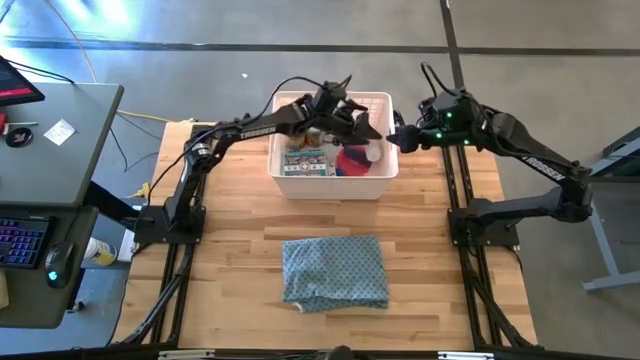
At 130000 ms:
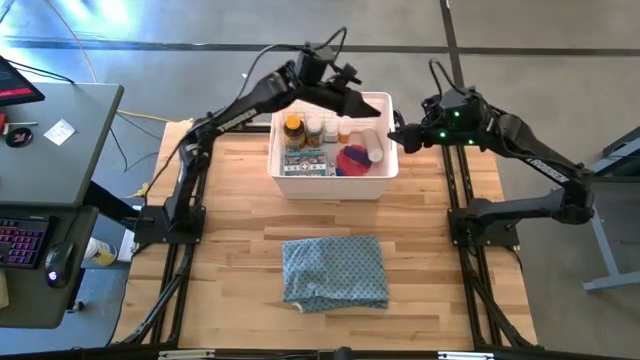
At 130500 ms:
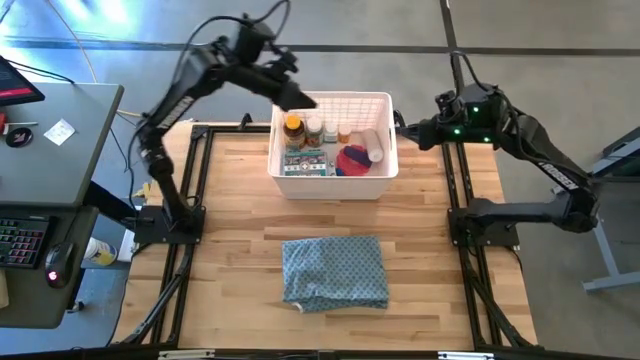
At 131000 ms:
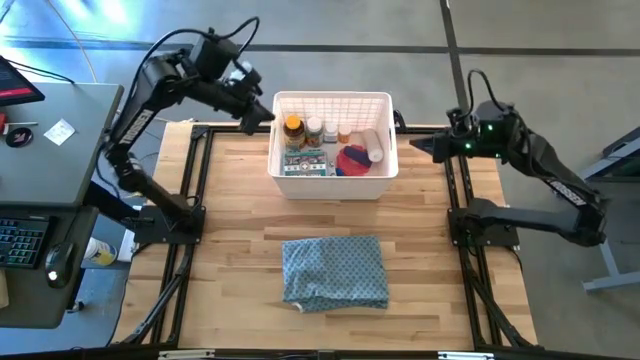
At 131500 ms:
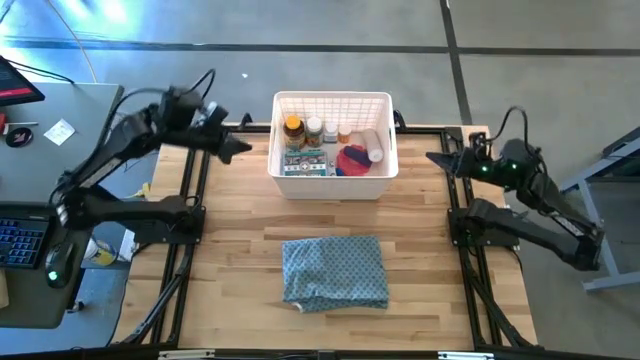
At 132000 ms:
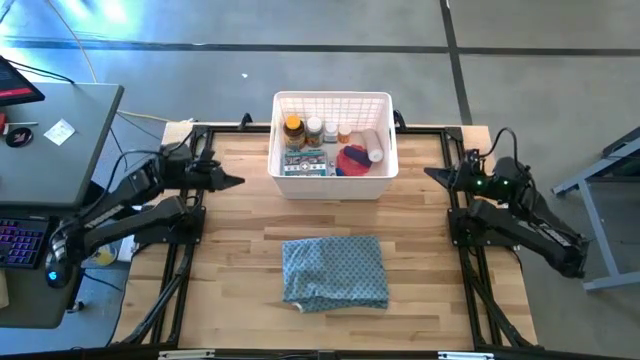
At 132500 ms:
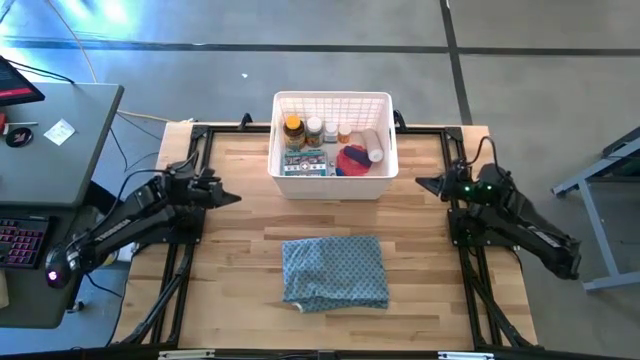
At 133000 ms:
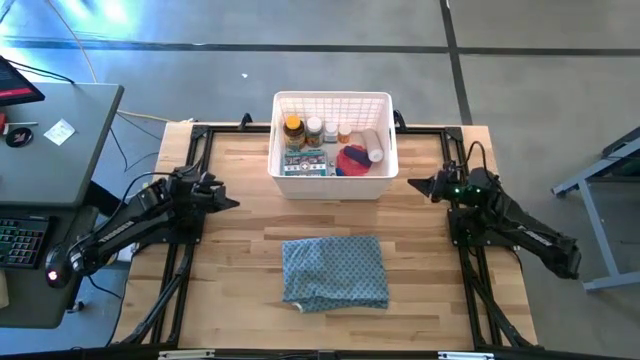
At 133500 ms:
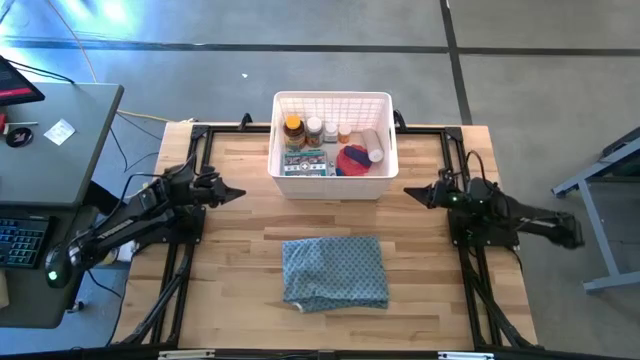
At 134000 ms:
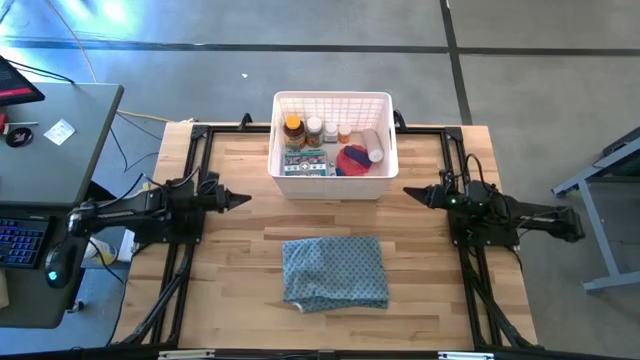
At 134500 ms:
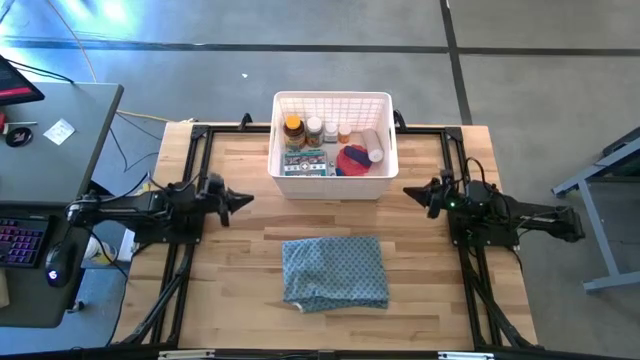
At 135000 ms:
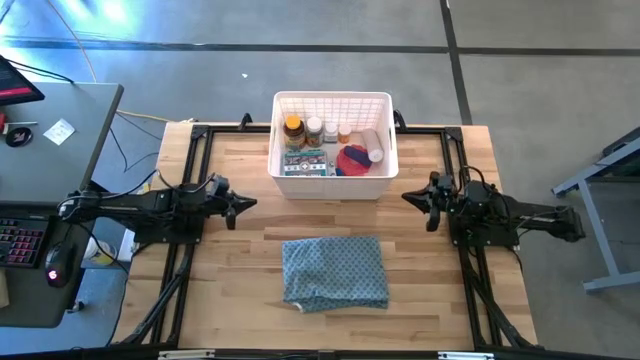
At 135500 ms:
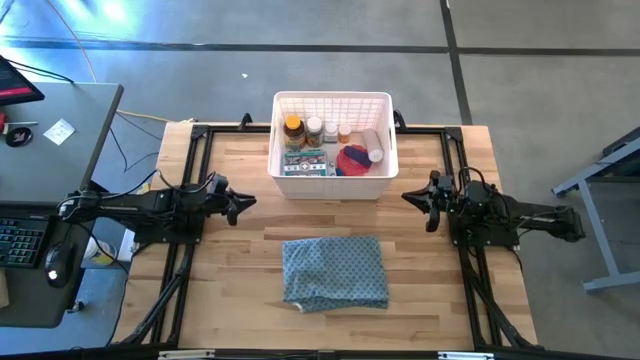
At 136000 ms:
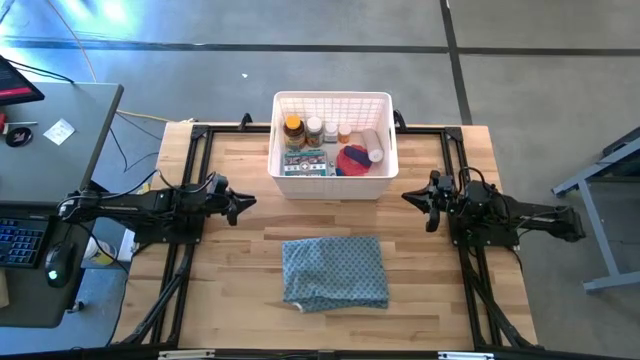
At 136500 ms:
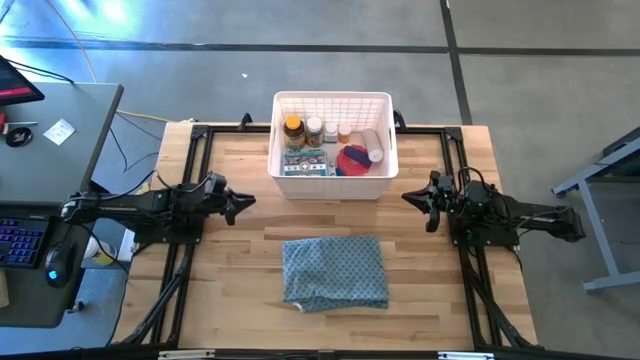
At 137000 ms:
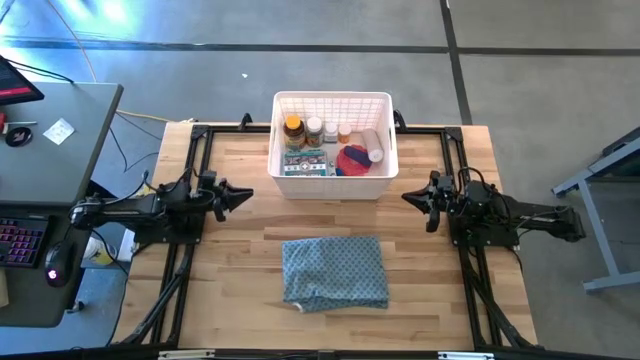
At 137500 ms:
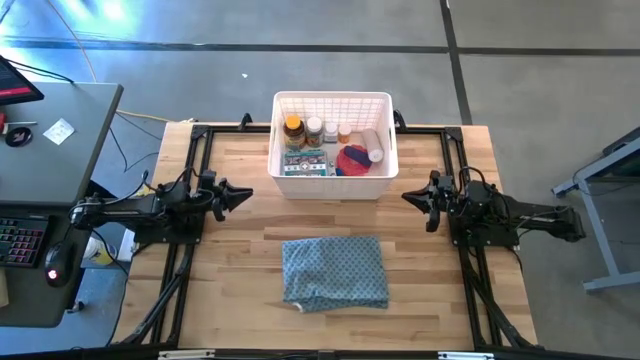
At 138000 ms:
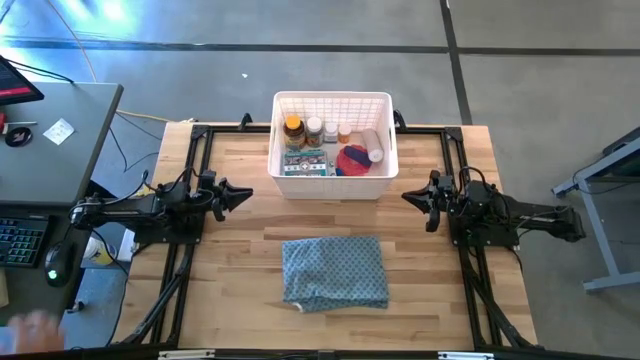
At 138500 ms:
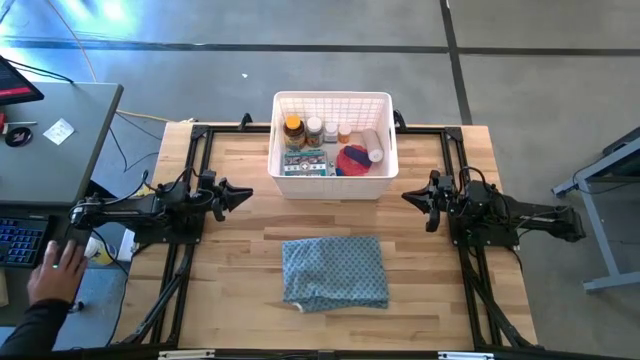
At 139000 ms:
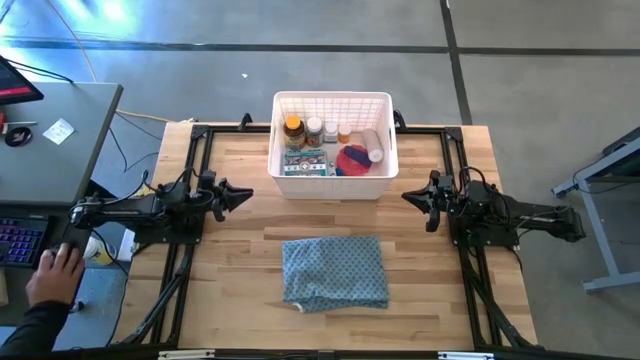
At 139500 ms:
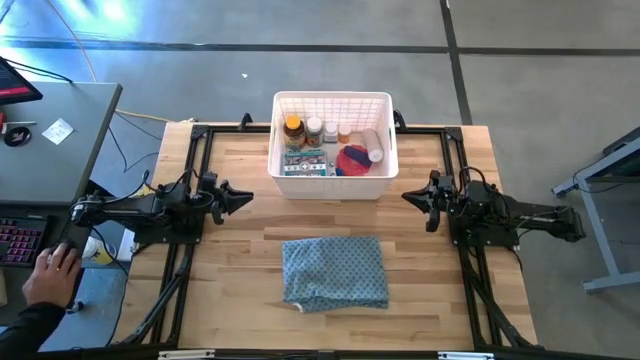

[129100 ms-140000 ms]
Task: Pick & place medical supplies in basket/bin
Return to Home Position

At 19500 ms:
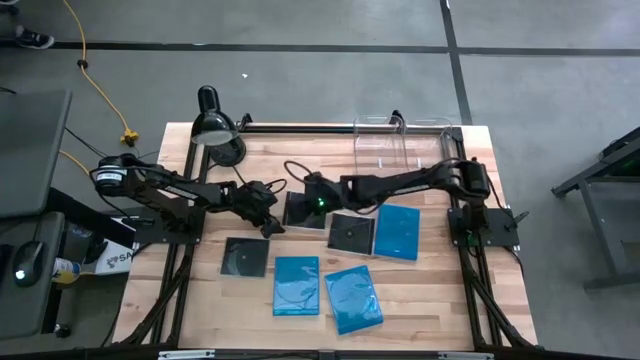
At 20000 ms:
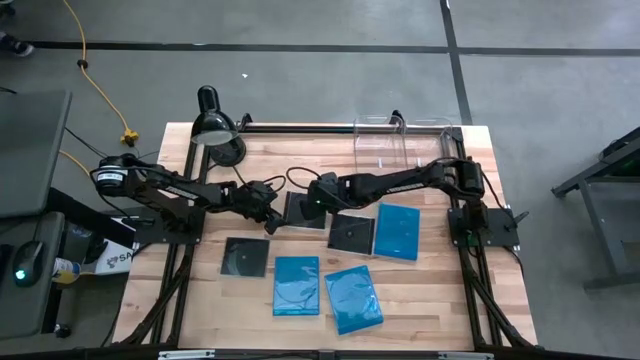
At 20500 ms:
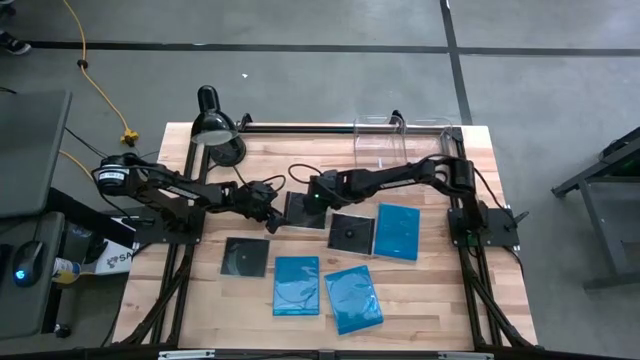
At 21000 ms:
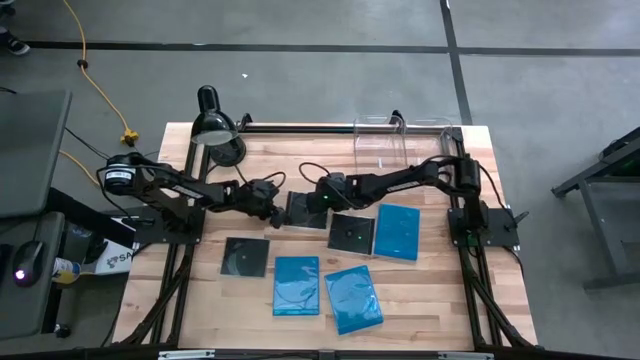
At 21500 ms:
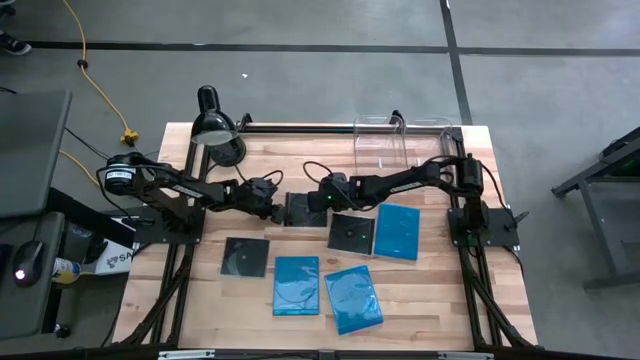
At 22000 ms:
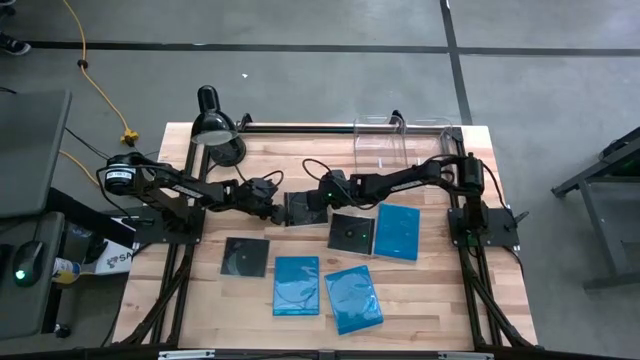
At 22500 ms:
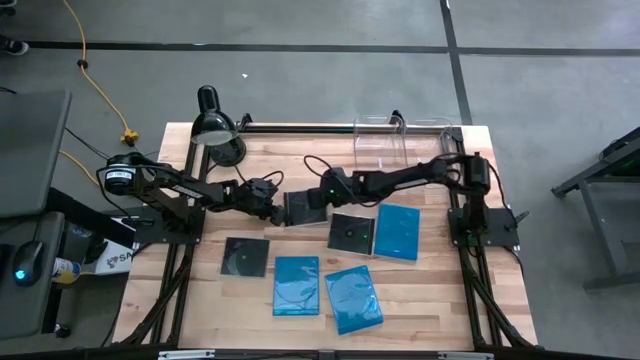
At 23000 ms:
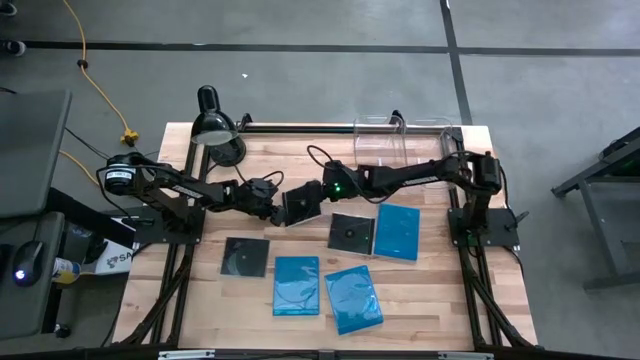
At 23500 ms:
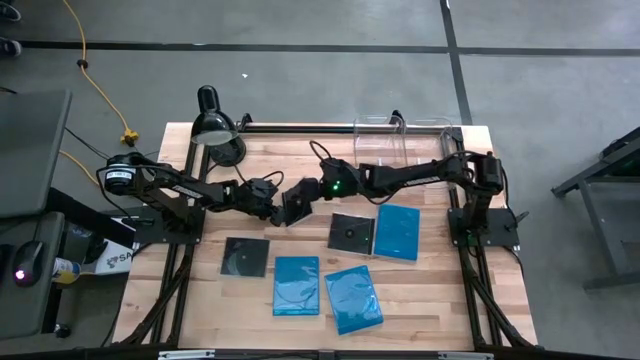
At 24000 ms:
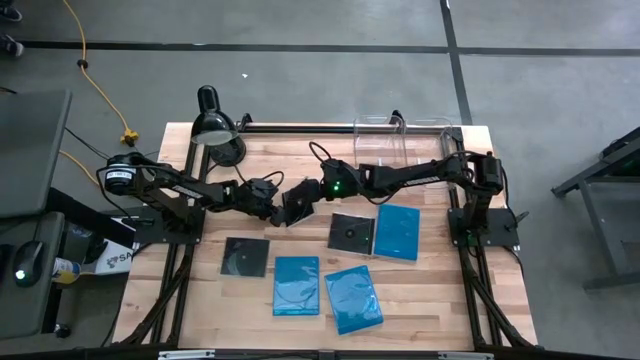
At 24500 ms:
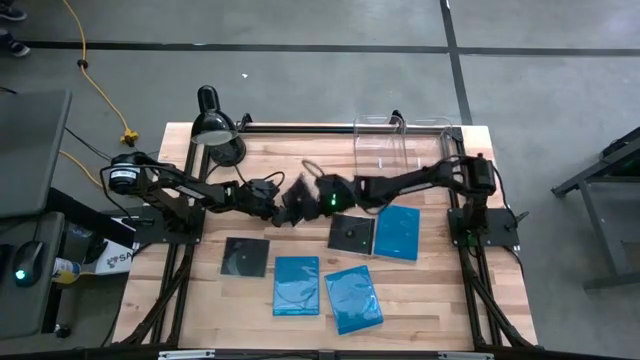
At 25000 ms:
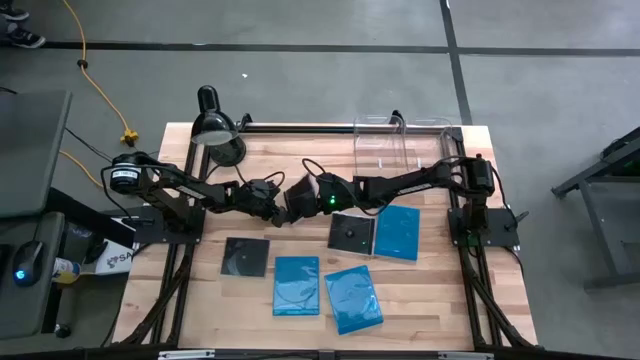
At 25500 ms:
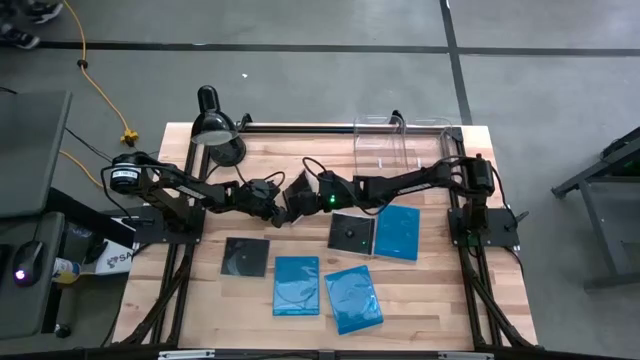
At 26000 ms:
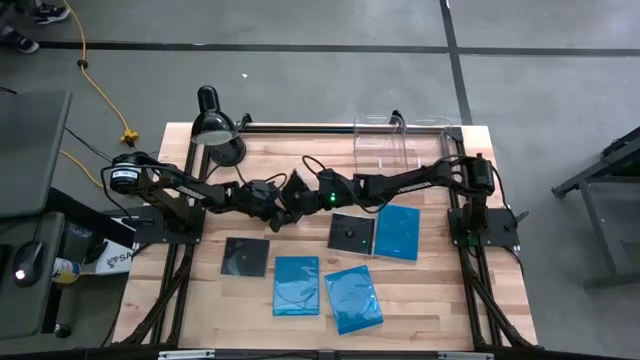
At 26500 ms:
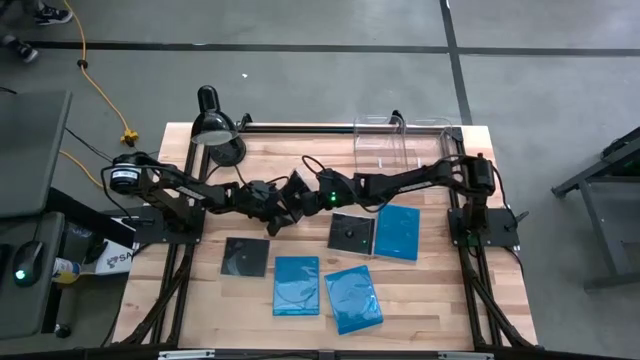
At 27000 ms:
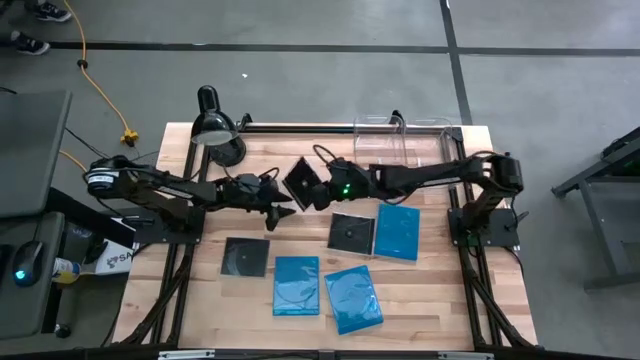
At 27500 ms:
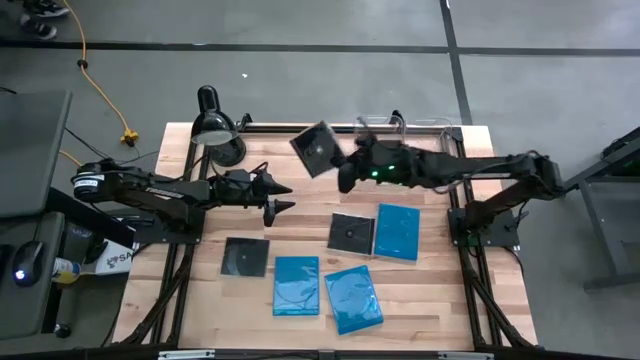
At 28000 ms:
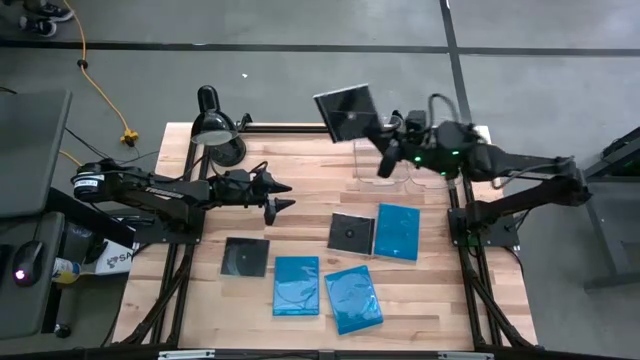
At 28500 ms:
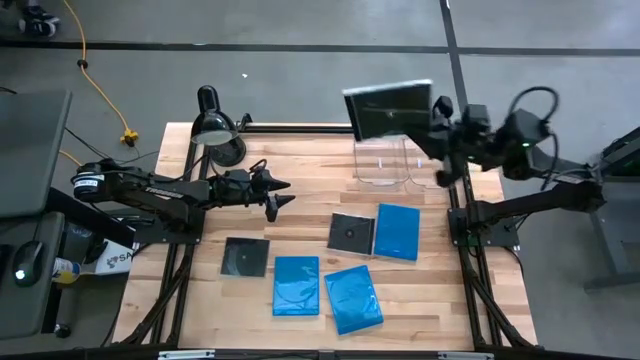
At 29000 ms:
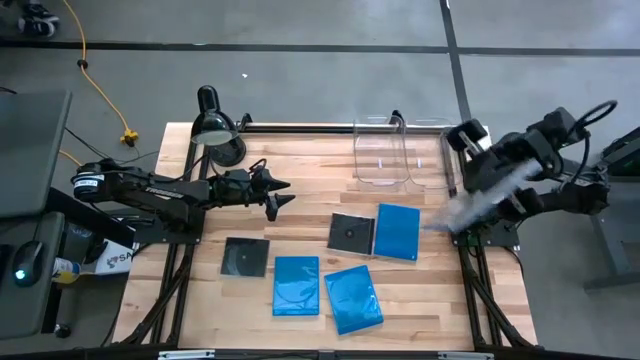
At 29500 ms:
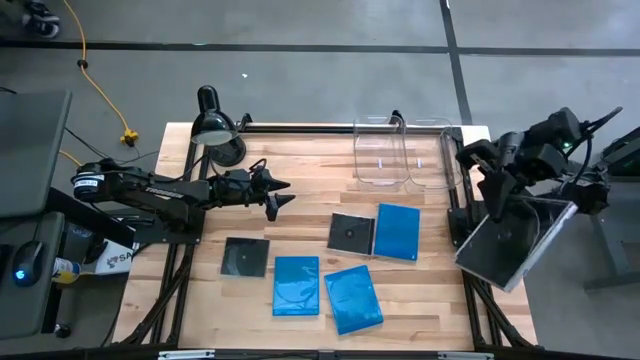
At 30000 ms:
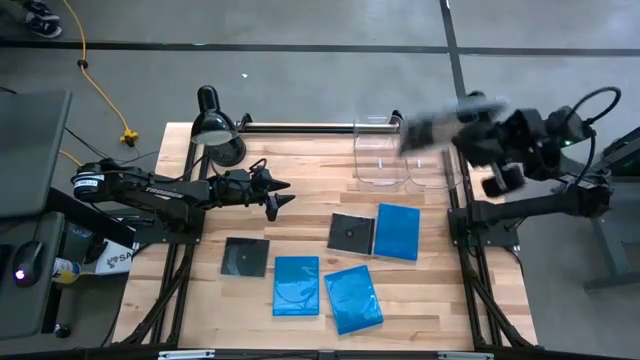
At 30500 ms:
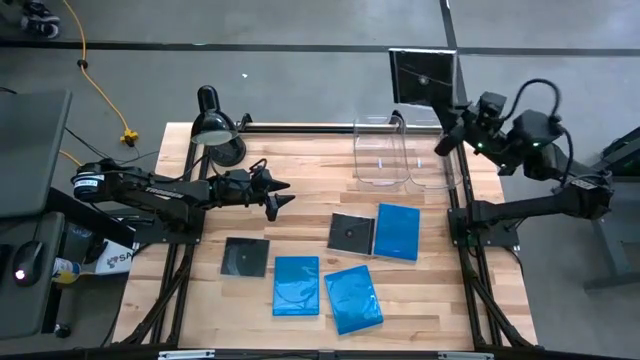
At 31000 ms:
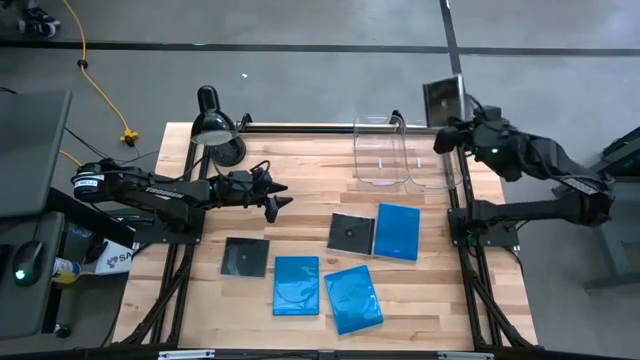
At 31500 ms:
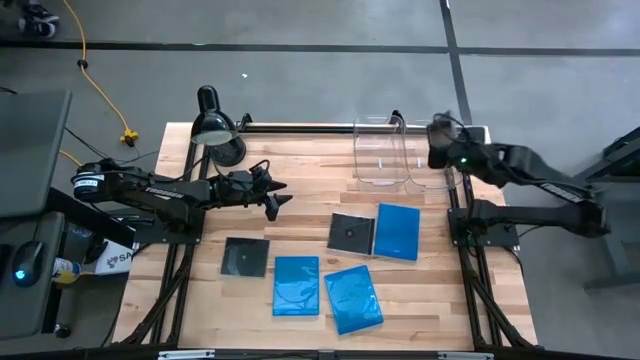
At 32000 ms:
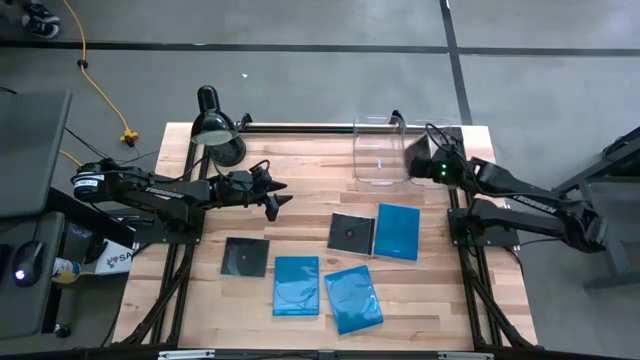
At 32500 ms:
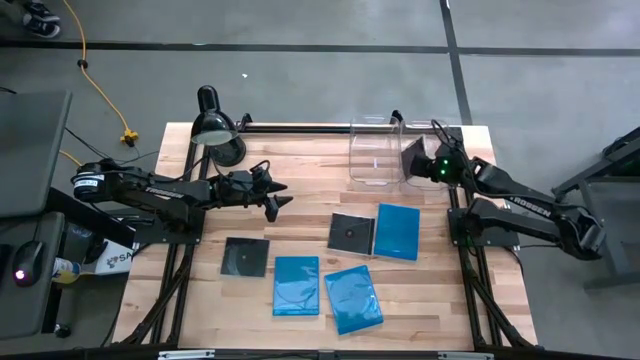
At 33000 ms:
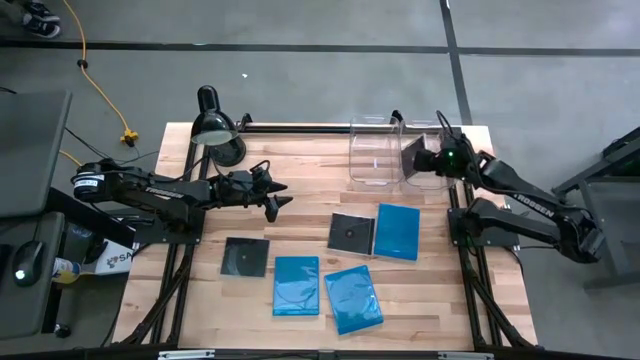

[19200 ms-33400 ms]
Task: Pick & place jewel cases by type
Put the top black CD case into the right transparent bin
